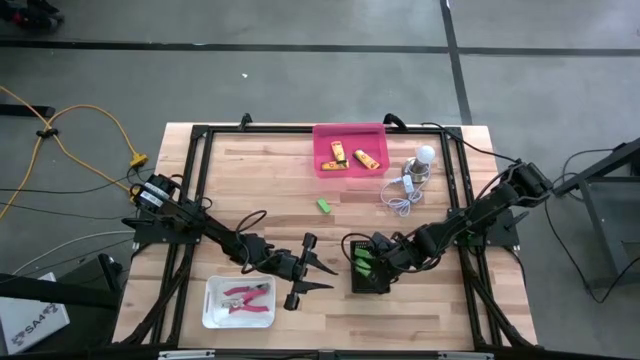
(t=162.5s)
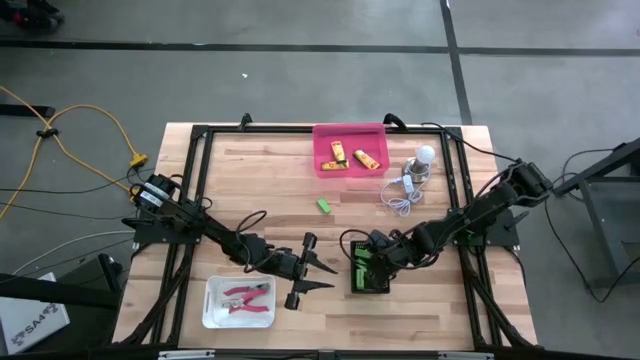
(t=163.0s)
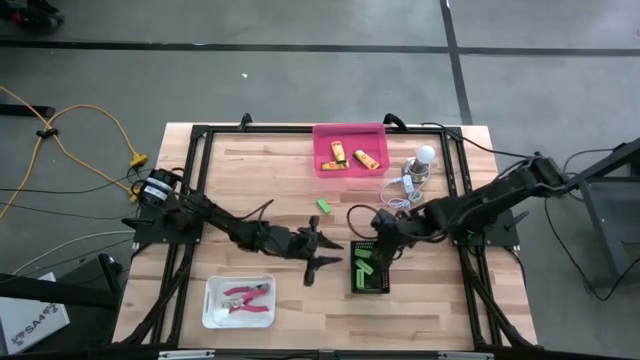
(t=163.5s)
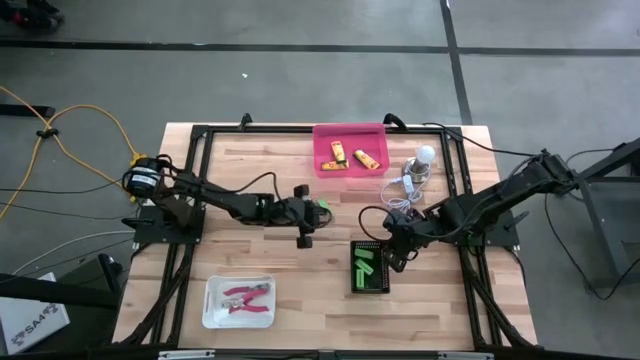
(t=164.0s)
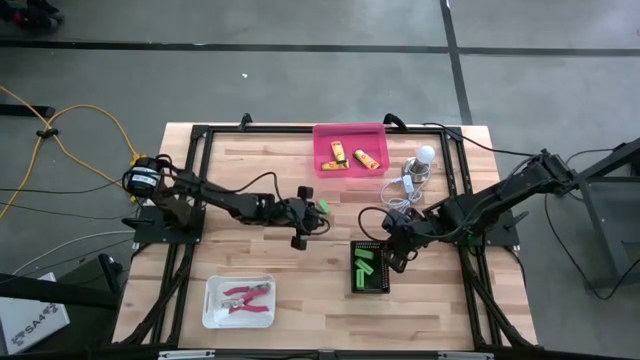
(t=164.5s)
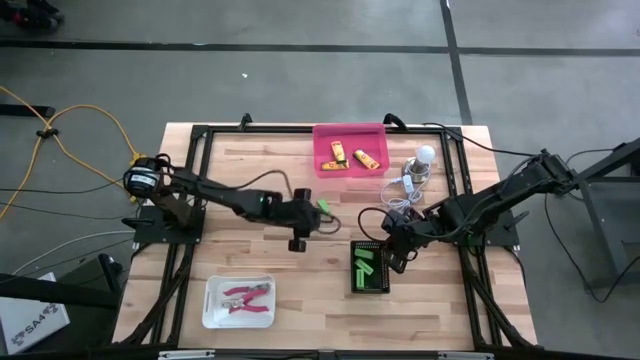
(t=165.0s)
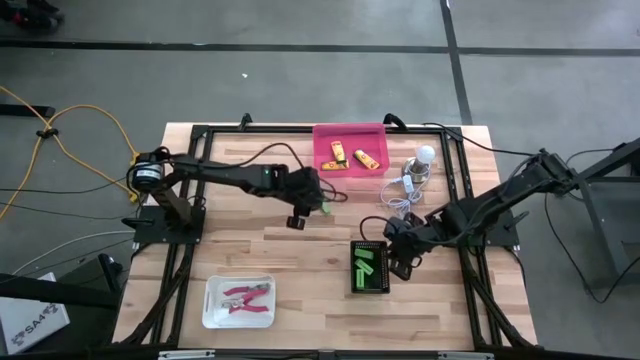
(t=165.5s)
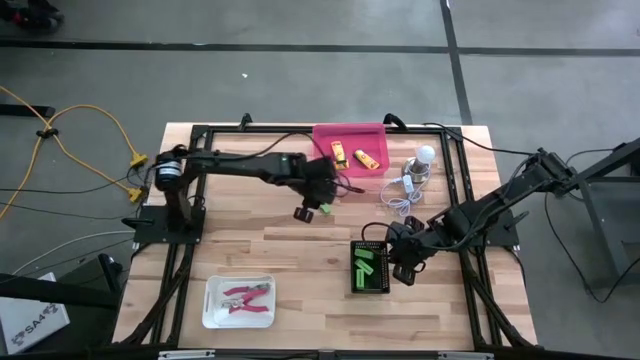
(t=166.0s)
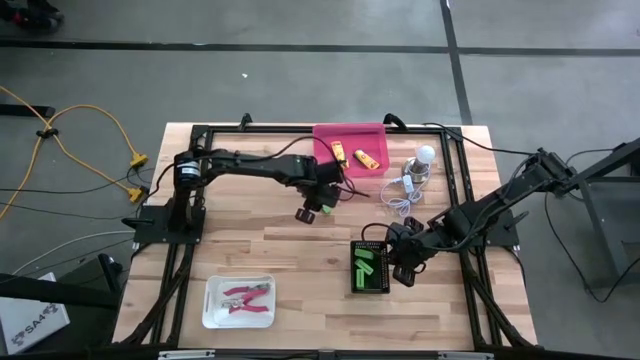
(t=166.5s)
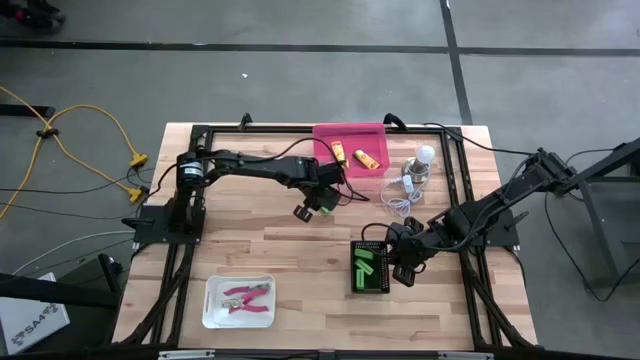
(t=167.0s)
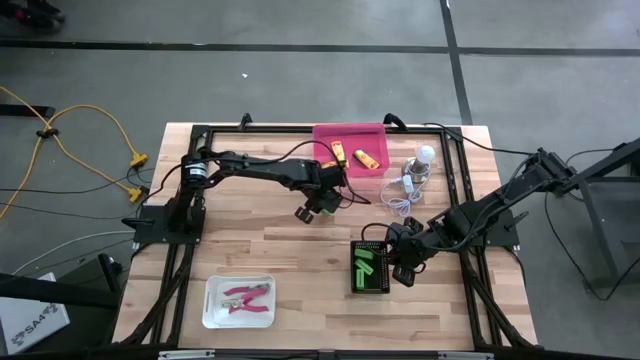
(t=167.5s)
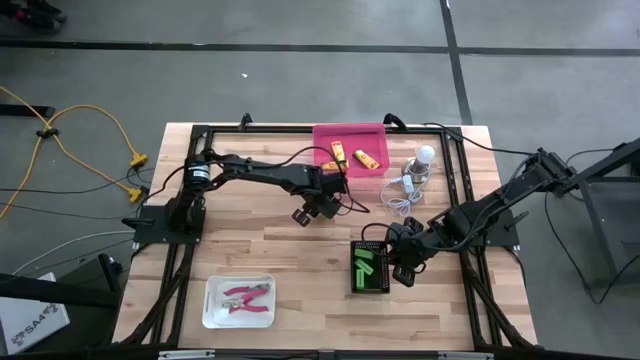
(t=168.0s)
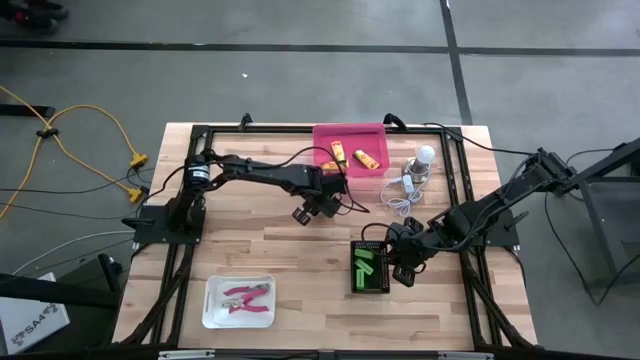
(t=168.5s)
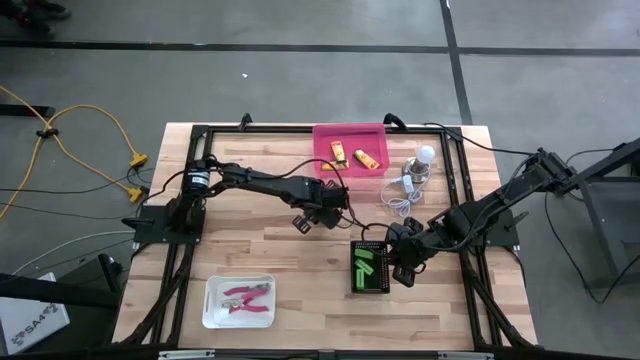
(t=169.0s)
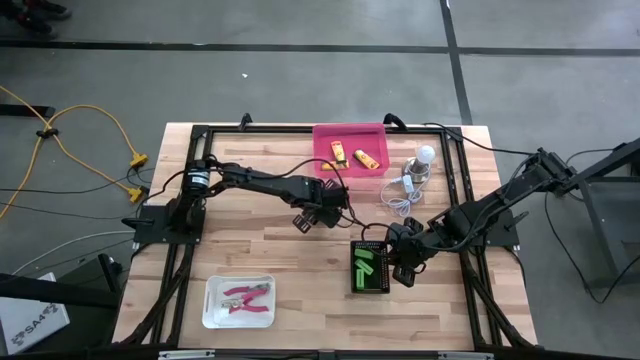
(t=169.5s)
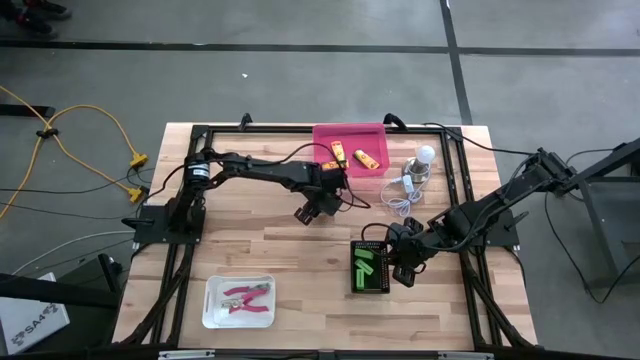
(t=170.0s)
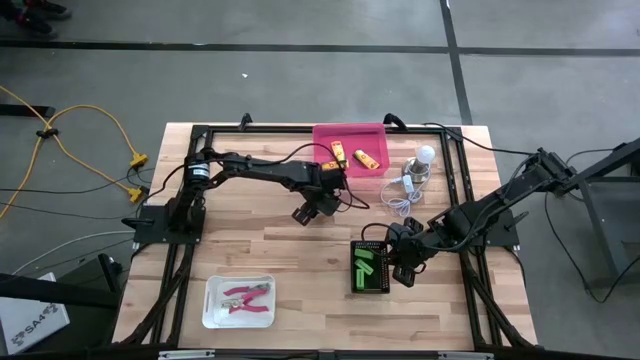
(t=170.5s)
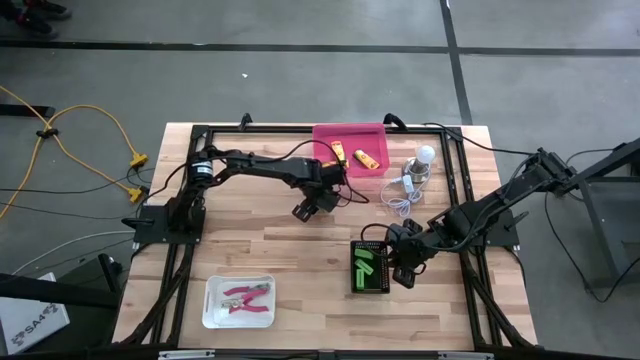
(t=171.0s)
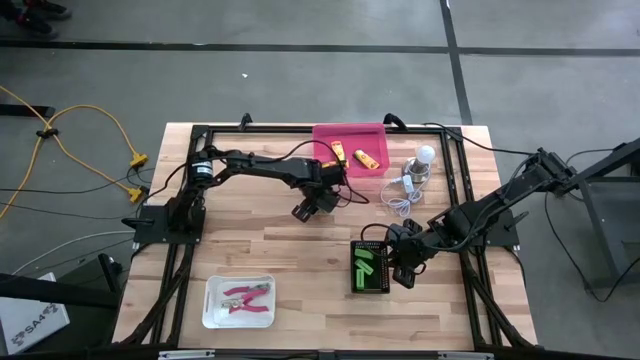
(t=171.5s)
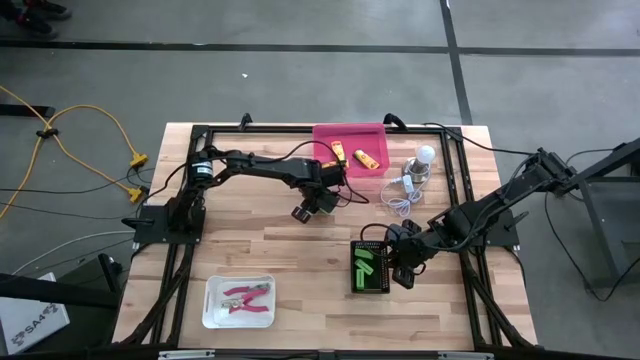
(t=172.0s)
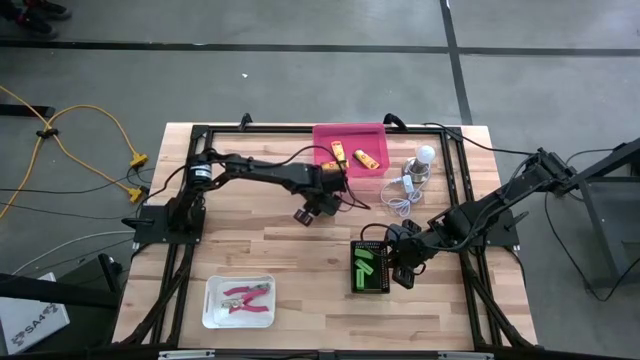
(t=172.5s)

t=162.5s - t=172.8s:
Task: Pick & Place School Supplies
Put the green eraser into the black bin

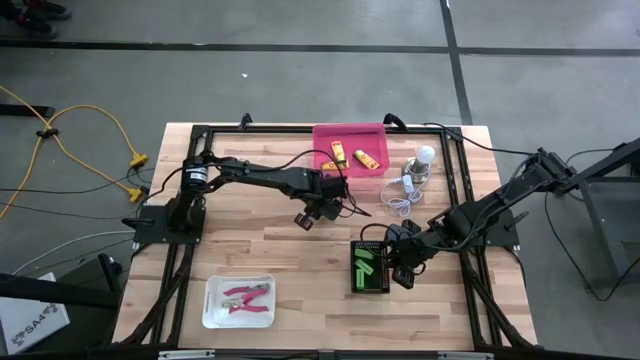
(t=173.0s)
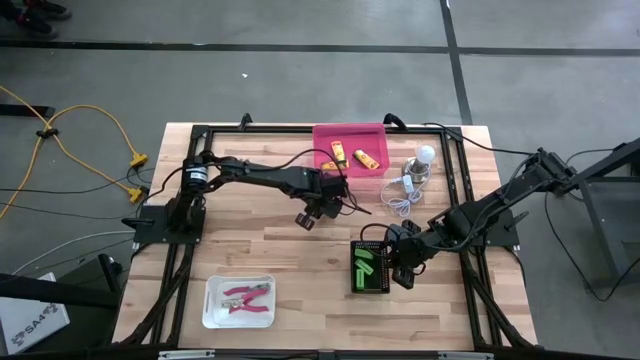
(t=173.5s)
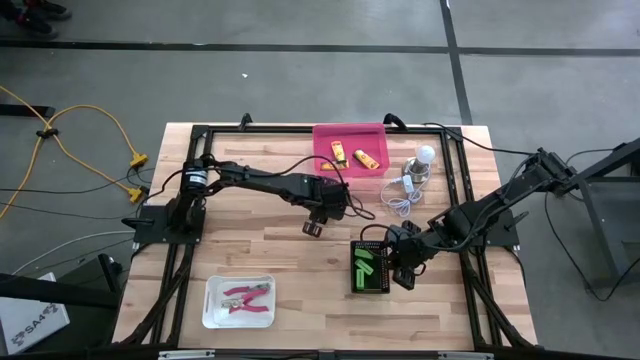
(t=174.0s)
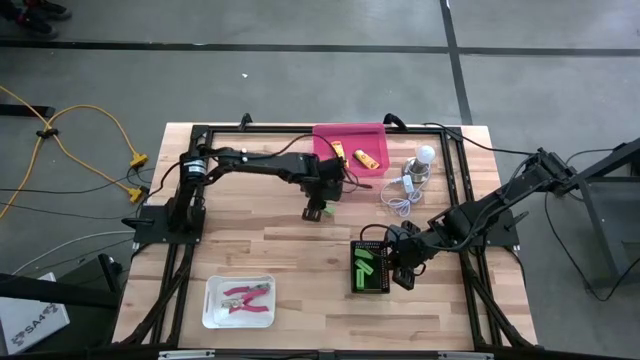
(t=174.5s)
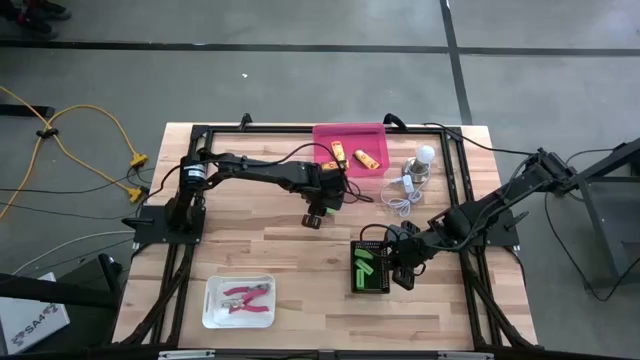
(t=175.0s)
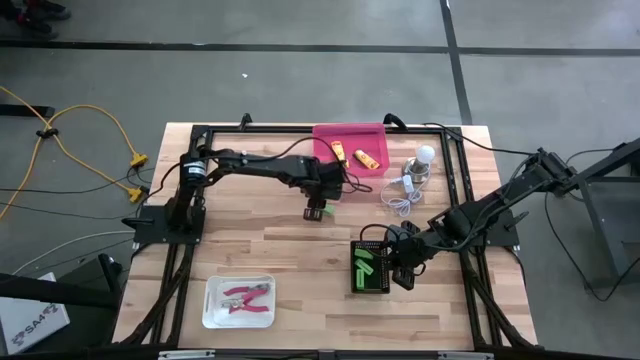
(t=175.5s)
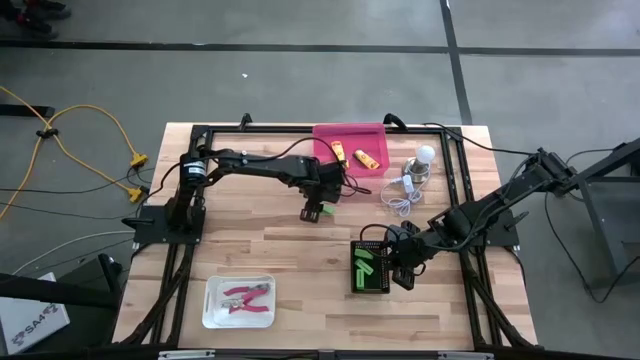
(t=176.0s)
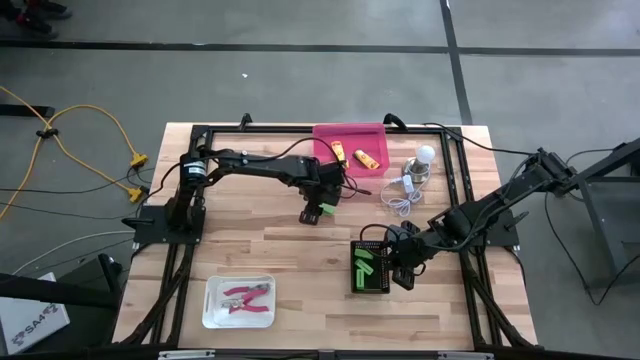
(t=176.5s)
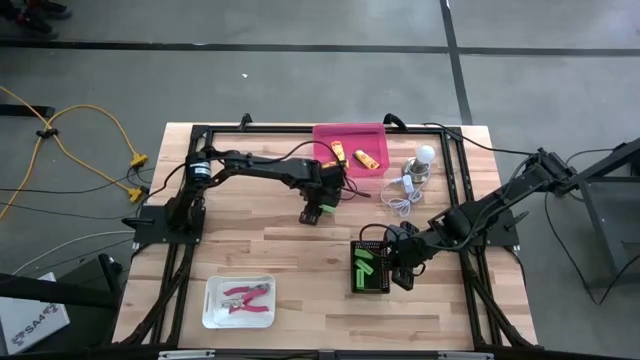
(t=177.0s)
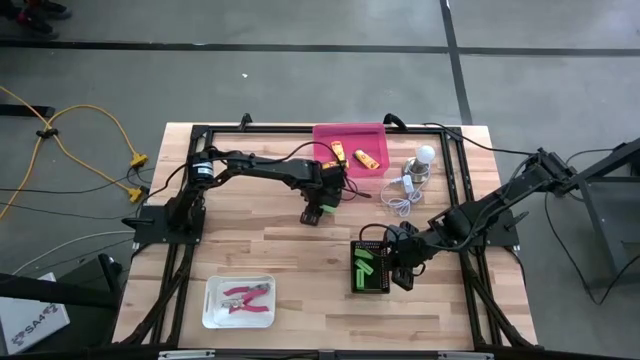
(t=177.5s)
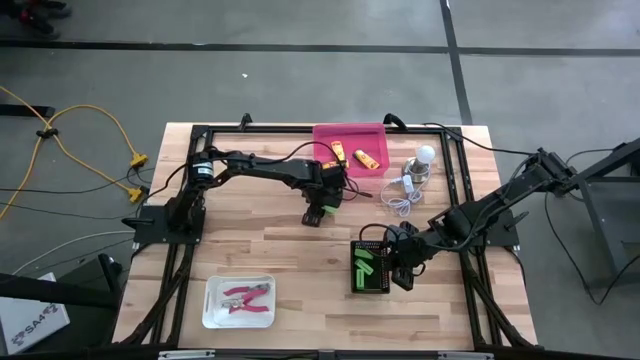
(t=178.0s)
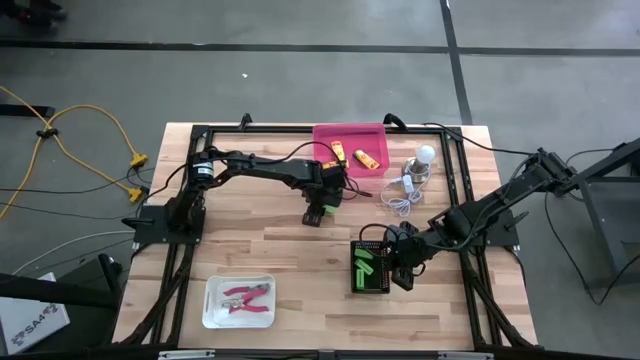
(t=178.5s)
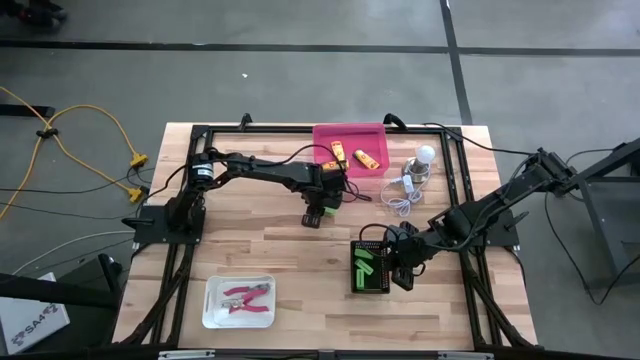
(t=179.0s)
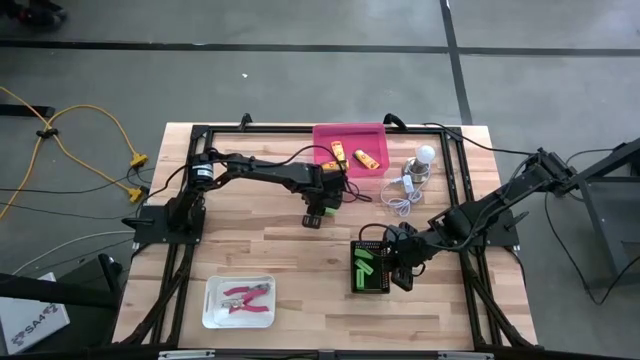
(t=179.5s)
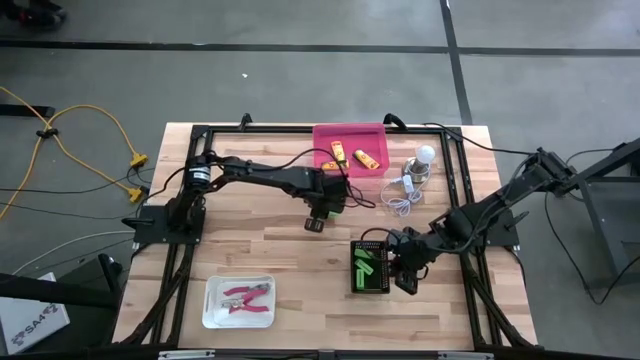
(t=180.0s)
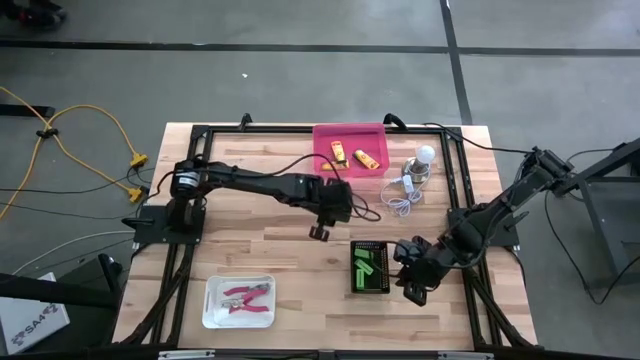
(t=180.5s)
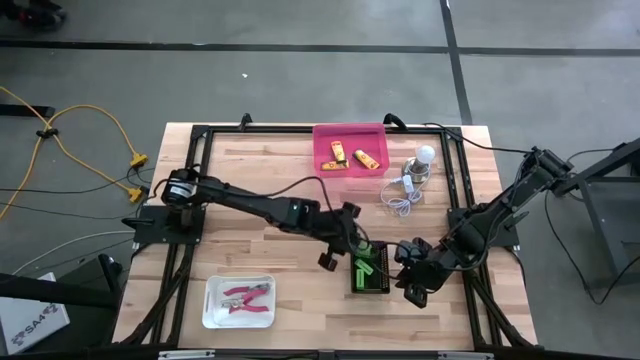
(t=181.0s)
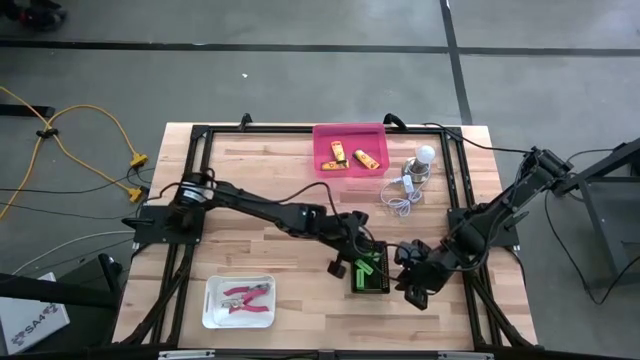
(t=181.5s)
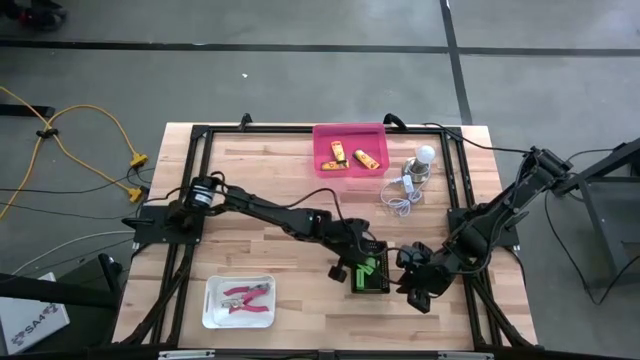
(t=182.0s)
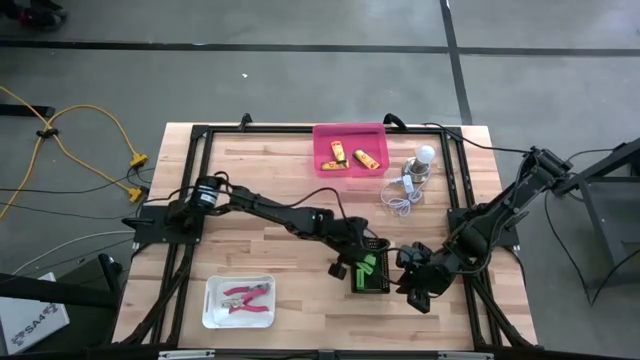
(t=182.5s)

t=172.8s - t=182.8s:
Put the green eraser into the black bin
